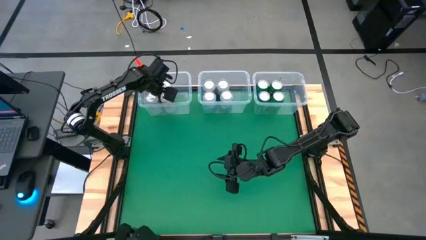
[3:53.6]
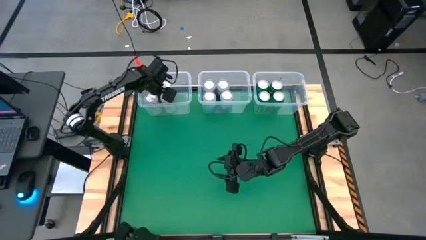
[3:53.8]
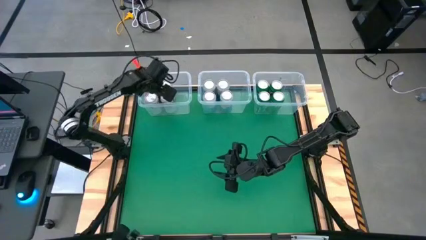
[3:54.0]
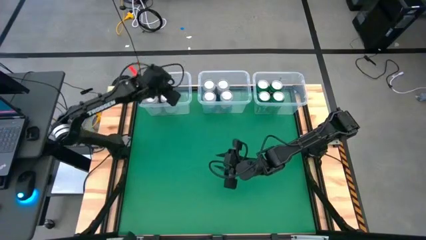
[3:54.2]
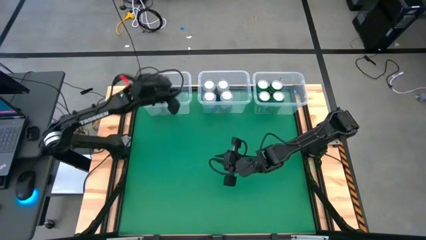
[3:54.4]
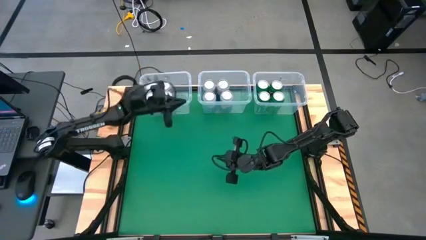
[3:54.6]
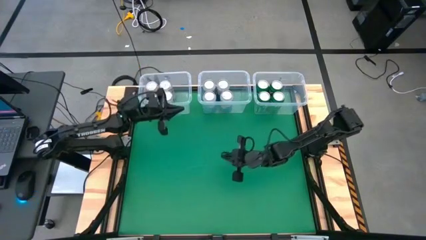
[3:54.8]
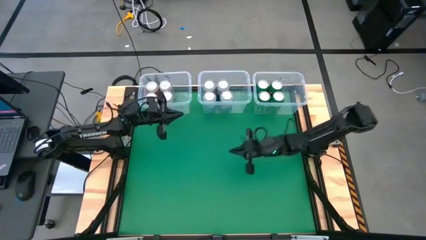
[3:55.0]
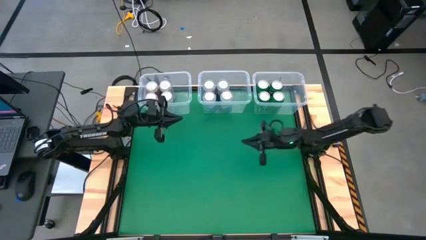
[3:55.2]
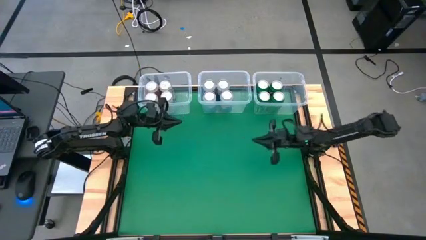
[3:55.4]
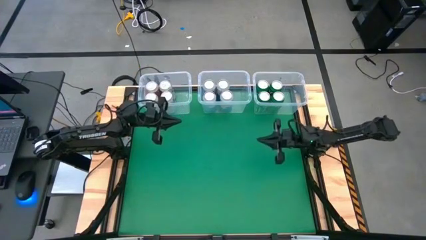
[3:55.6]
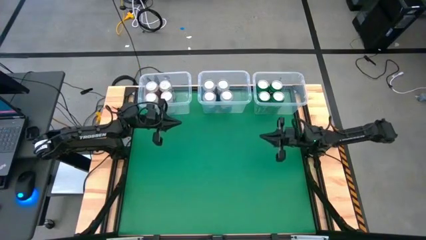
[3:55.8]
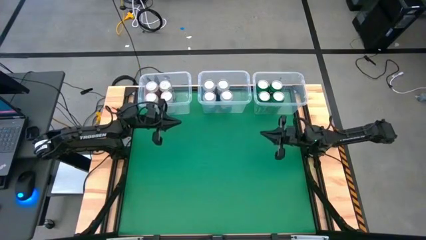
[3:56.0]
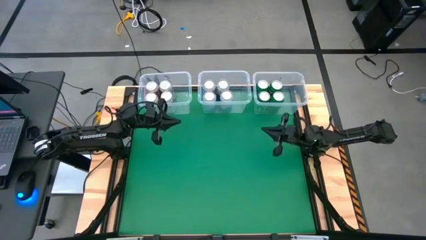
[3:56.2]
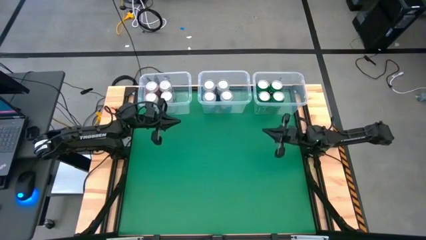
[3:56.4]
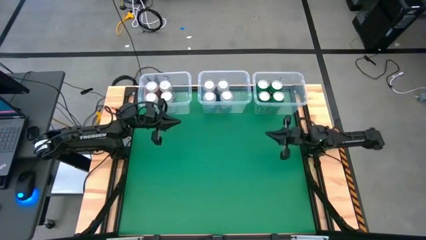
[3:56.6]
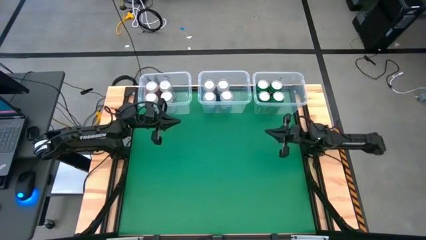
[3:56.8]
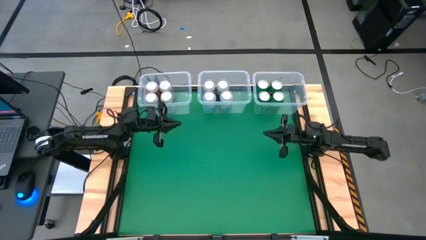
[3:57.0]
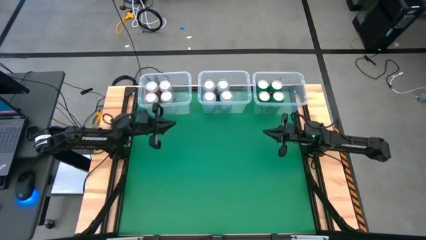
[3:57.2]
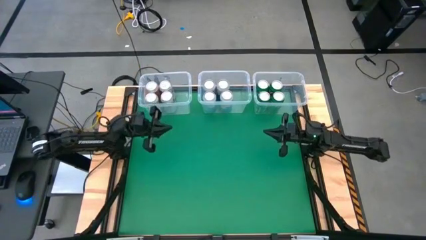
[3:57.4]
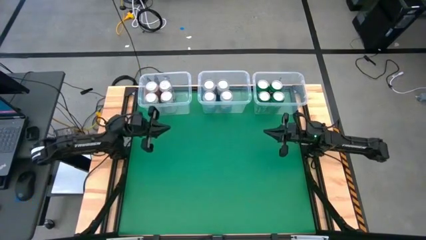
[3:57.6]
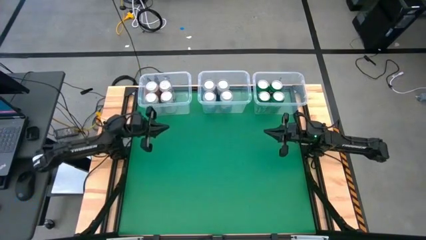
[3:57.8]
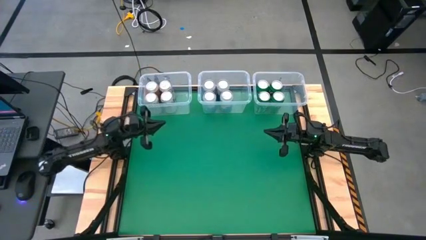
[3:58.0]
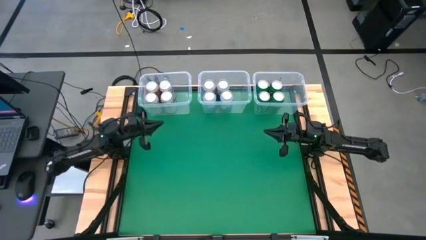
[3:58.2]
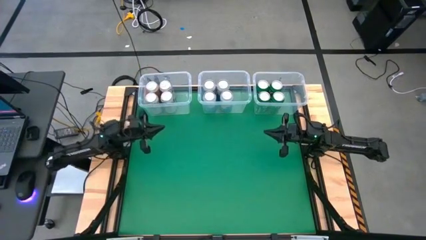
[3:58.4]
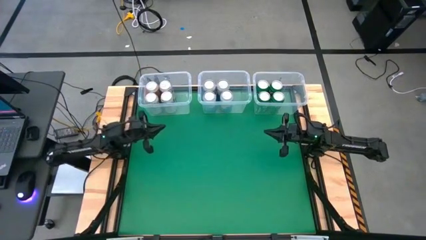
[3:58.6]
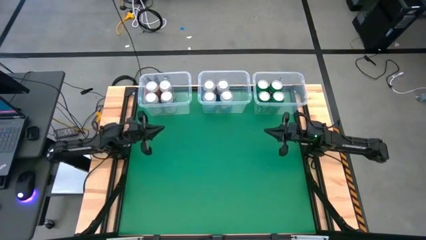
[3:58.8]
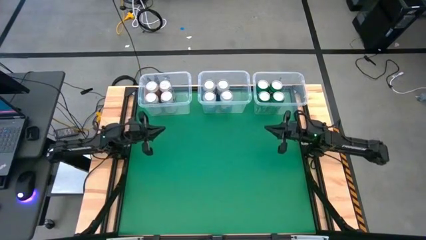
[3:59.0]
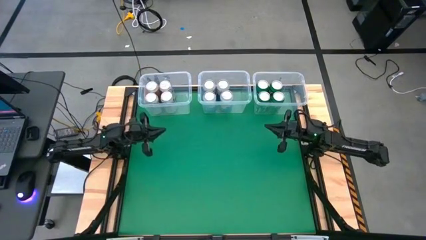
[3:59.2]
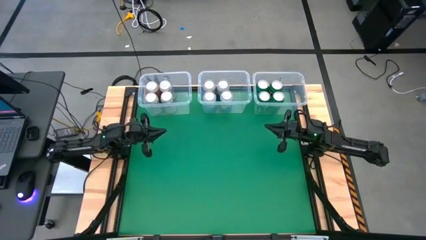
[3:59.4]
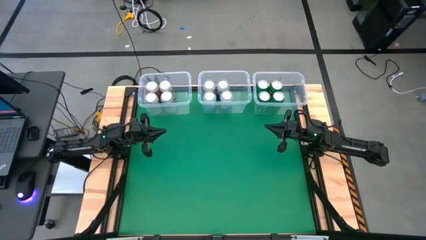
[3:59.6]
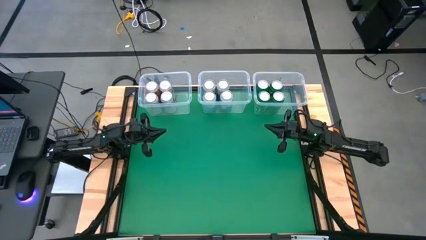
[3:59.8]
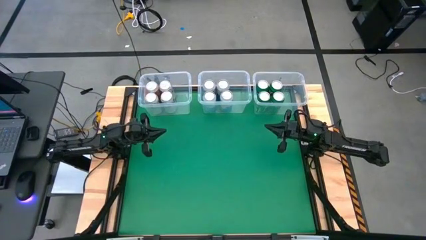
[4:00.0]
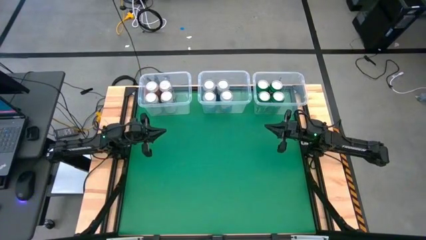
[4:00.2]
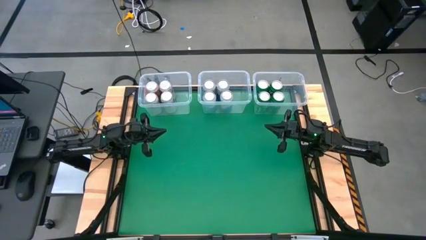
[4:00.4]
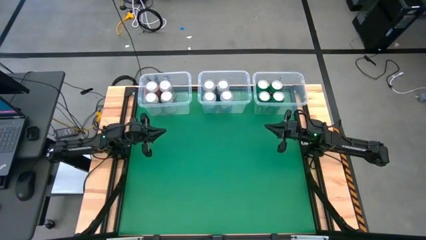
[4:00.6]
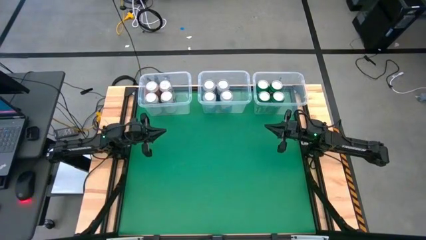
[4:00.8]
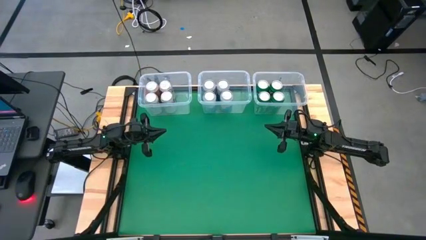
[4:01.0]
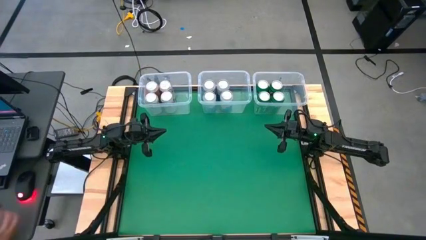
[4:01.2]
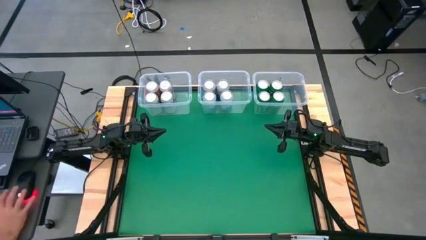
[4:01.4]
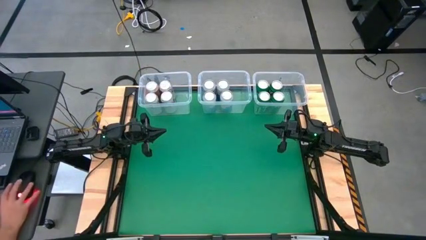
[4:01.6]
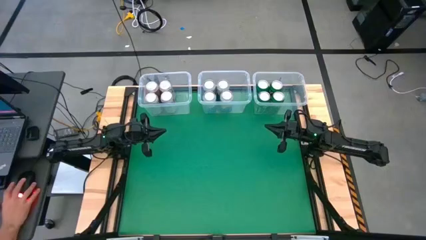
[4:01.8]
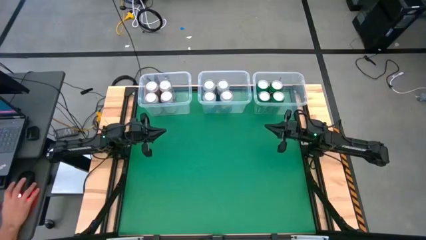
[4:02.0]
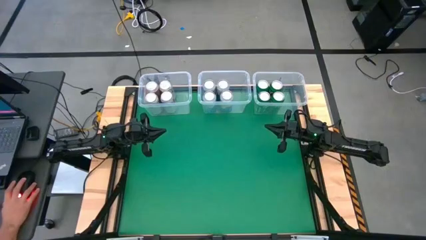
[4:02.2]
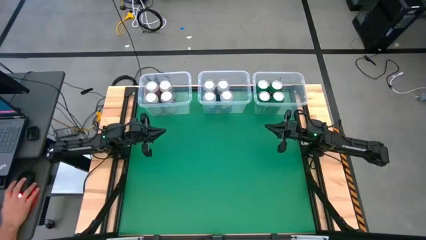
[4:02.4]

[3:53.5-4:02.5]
Task: Sort soda cans
Return to Home Position

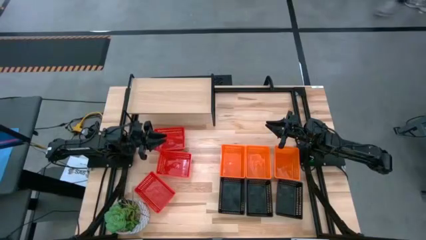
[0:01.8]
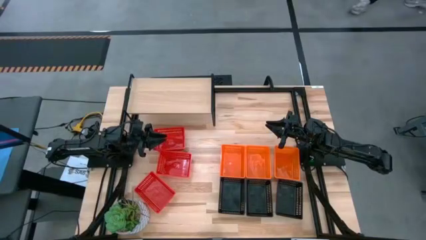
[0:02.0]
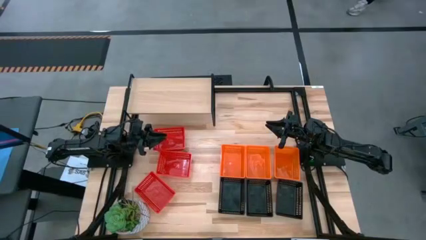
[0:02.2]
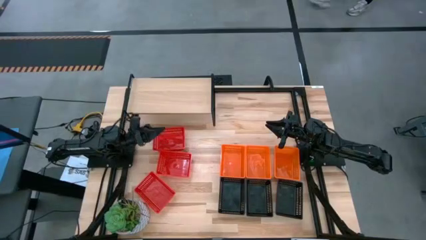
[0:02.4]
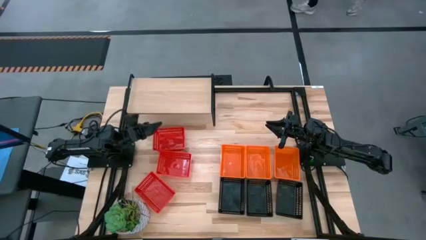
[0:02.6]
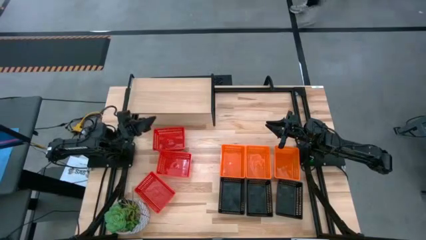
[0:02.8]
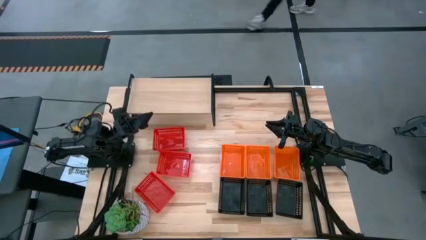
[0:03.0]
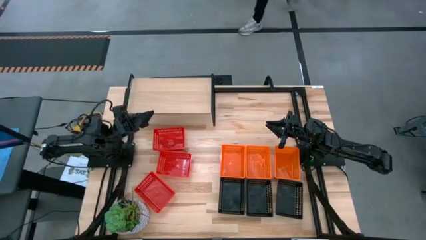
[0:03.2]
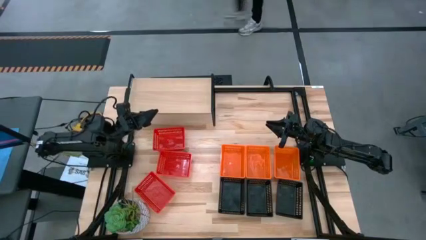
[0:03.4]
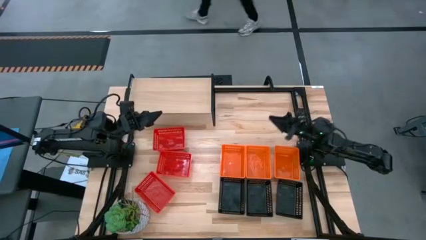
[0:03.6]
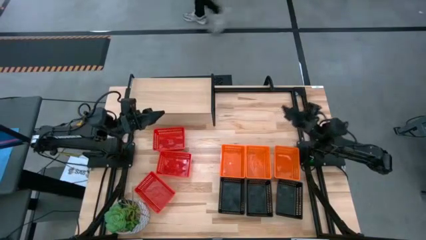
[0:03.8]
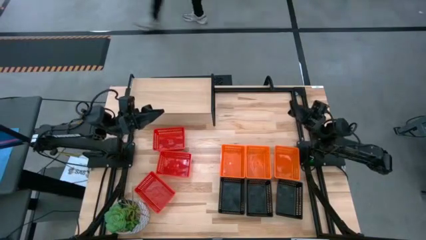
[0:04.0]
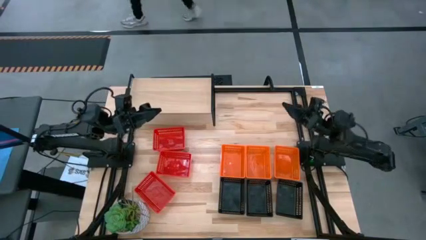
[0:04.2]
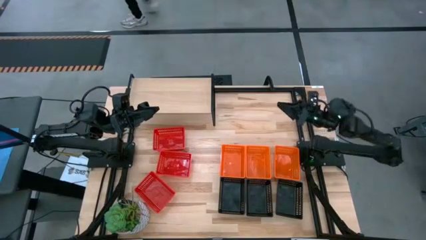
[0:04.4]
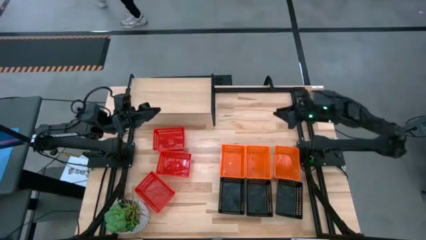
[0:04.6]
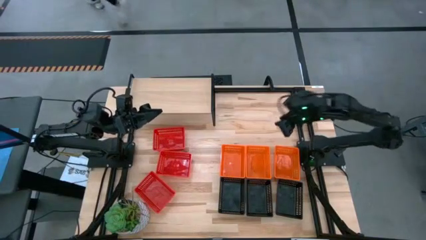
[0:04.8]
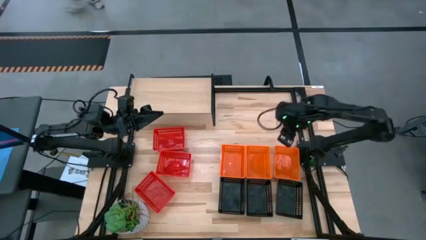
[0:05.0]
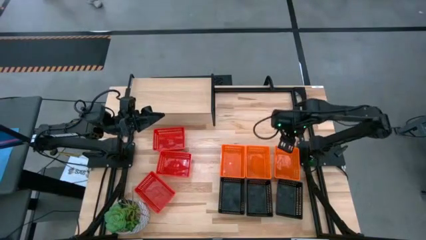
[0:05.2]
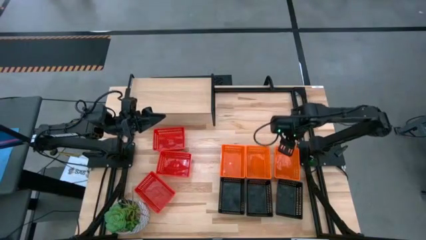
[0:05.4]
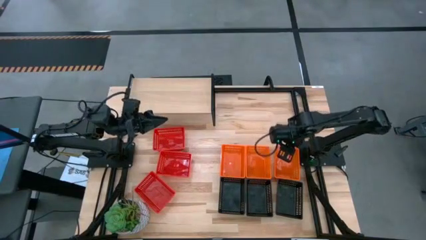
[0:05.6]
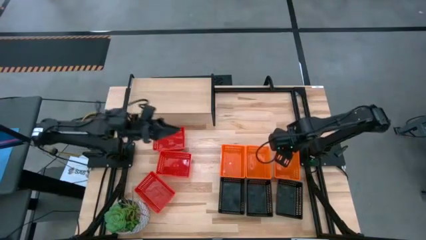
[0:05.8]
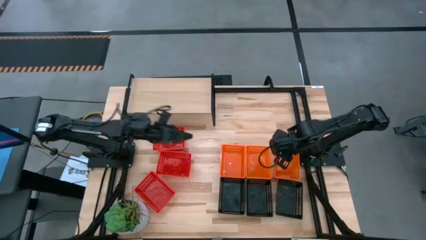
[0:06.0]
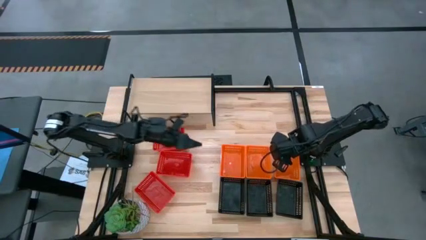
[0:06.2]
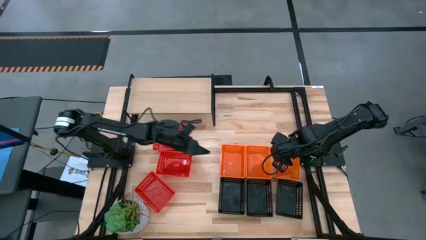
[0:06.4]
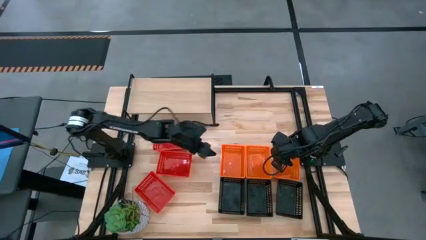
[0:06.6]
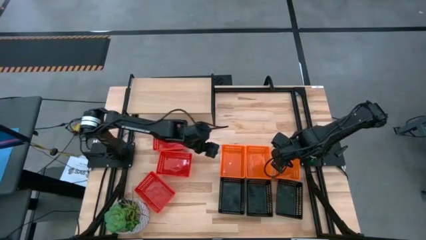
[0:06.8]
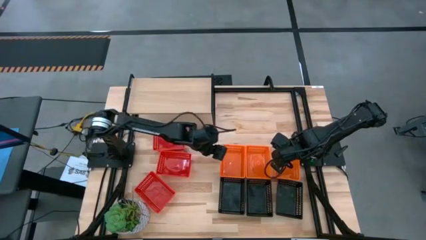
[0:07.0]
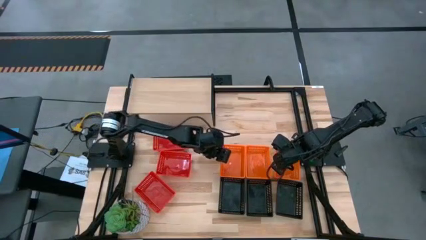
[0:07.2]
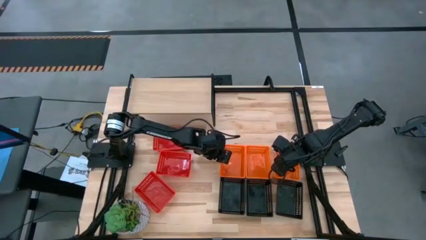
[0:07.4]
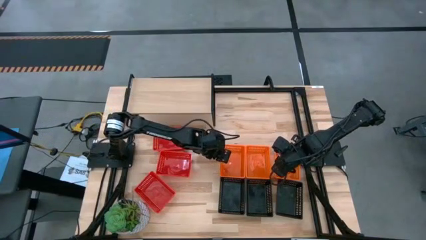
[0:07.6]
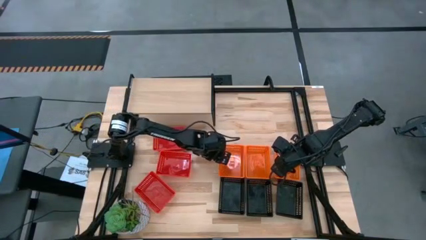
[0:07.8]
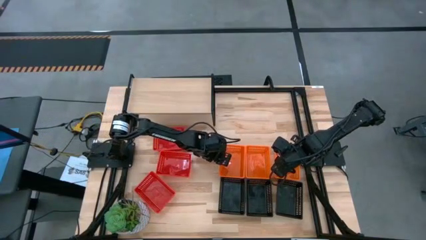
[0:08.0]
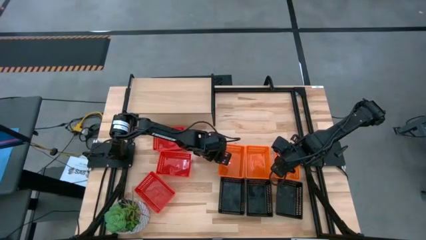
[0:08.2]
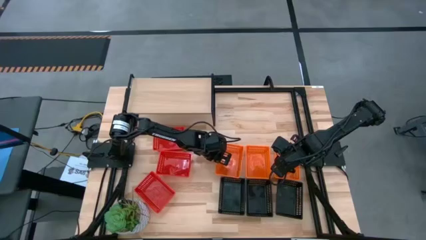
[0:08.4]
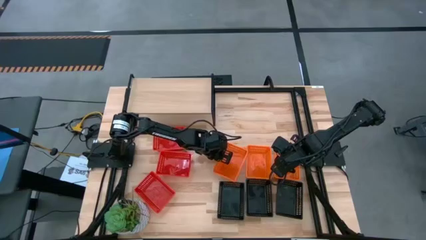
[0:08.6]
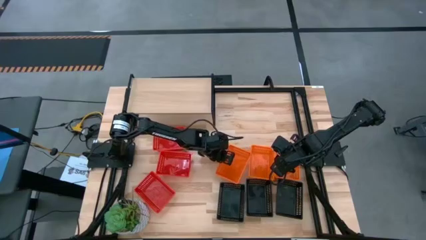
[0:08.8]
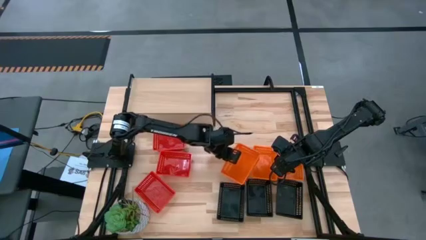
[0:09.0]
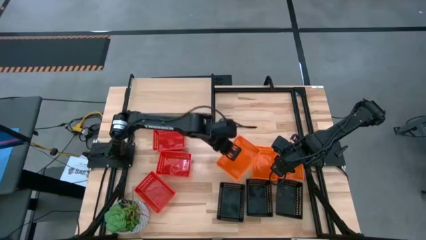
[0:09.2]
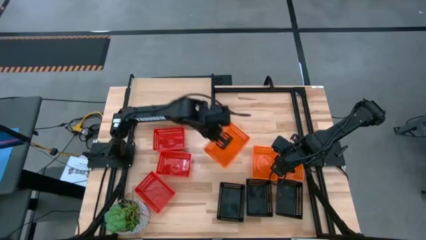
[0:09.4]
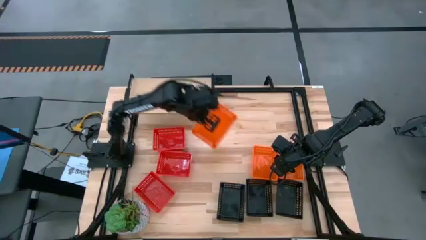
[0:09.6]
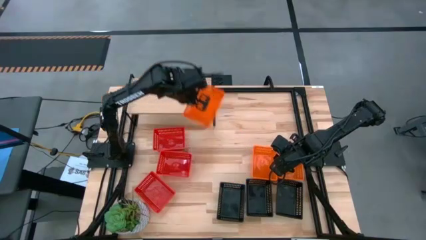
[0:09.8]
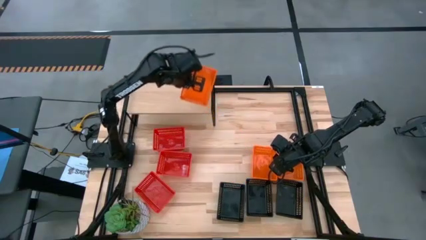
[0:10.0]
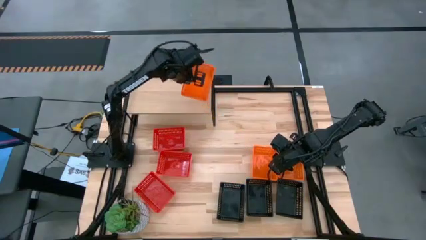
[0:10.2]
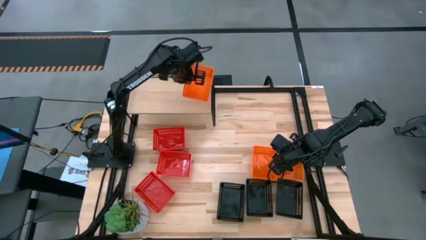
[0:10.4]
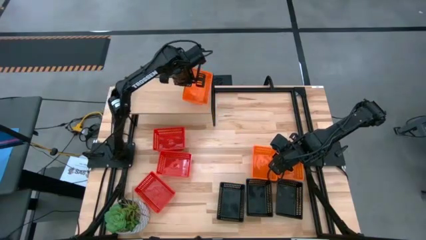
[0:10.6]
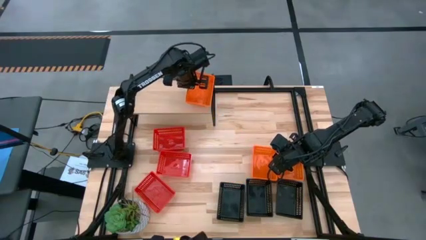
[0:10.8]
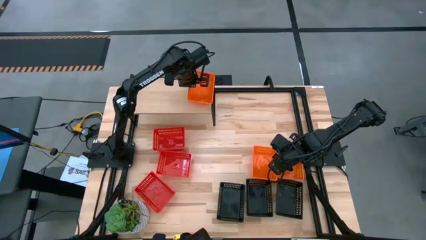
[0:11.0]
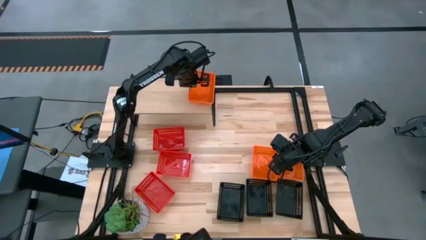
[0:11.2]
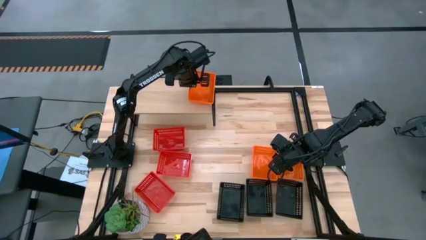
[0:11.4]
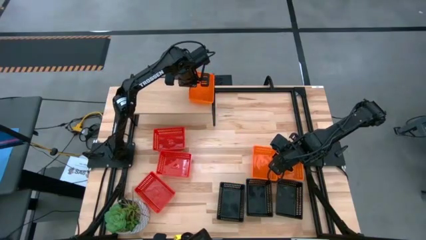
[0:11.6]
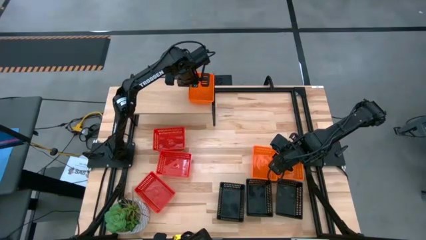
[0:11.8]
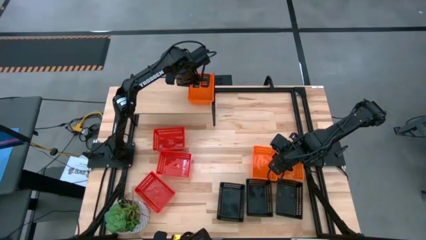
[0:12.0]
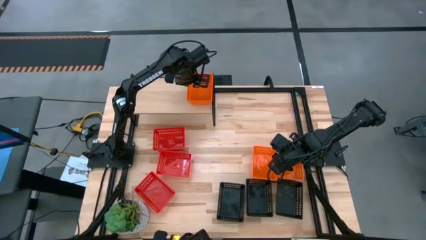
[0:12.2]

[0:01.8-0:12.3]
Task: Stack baskets on shelf by color
Put the left orange bin on the shelf
